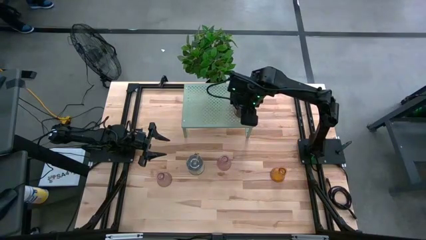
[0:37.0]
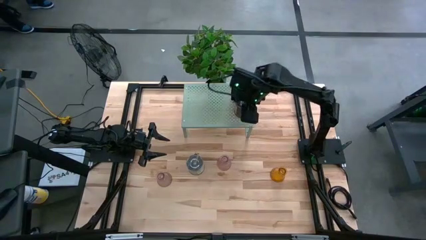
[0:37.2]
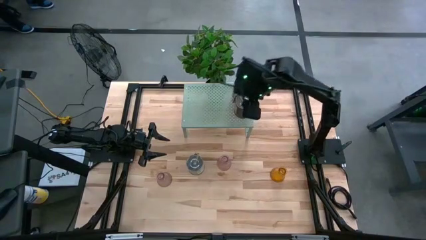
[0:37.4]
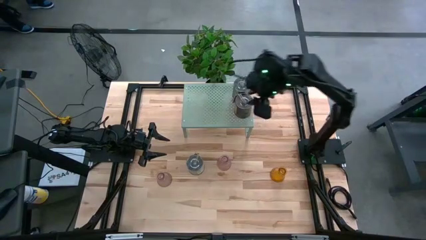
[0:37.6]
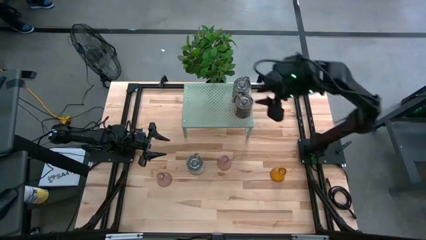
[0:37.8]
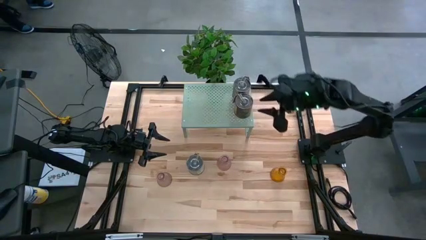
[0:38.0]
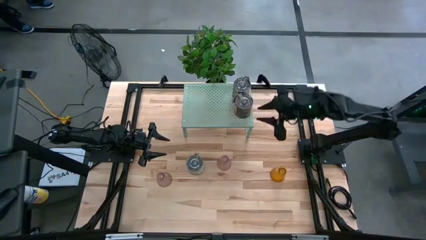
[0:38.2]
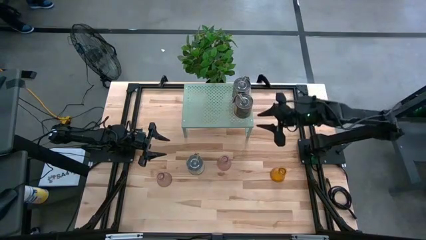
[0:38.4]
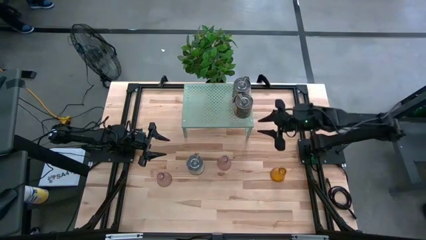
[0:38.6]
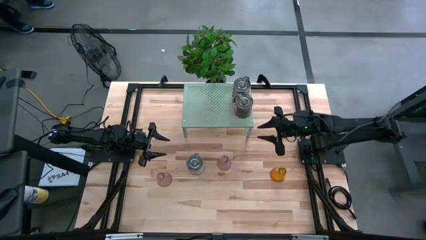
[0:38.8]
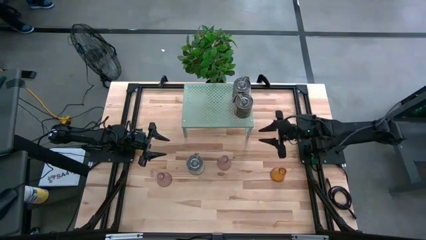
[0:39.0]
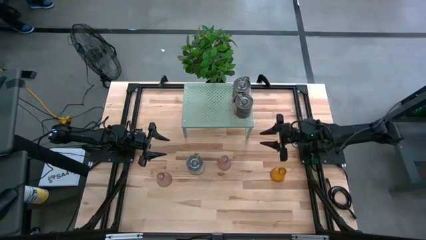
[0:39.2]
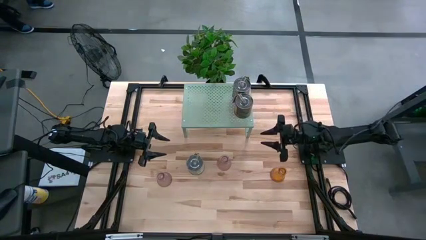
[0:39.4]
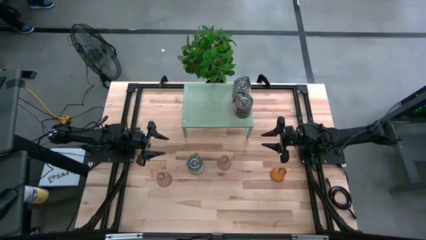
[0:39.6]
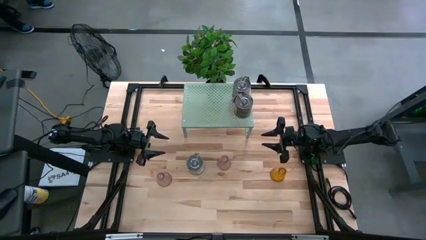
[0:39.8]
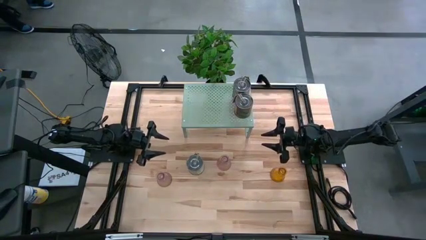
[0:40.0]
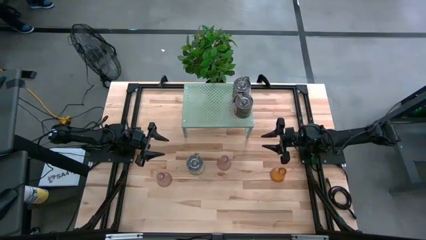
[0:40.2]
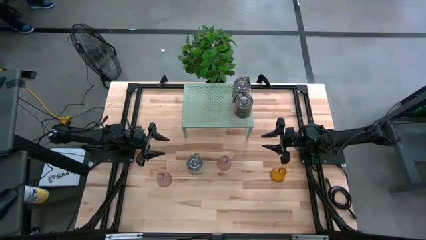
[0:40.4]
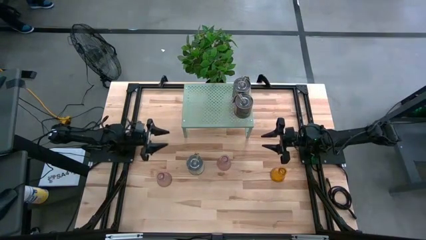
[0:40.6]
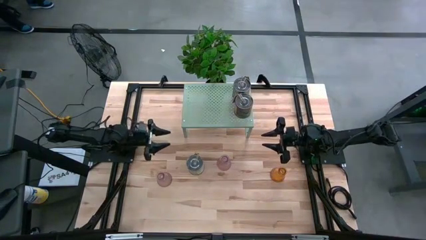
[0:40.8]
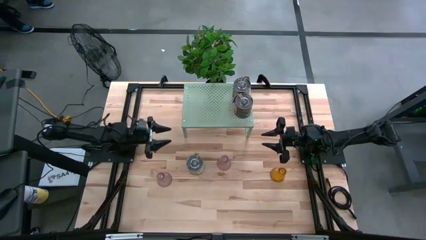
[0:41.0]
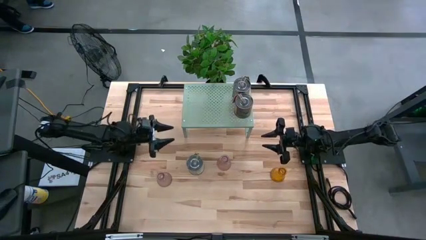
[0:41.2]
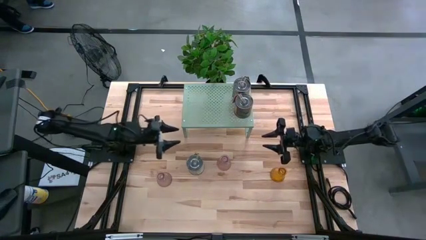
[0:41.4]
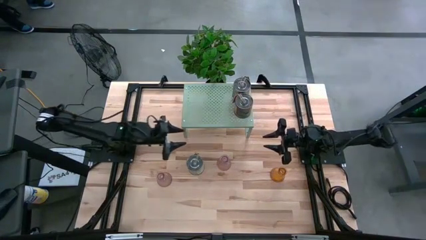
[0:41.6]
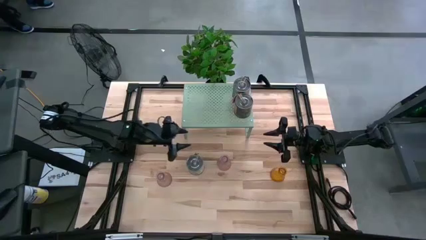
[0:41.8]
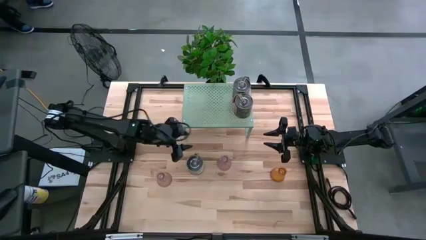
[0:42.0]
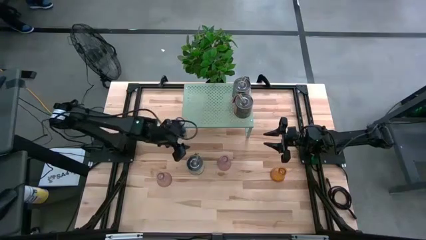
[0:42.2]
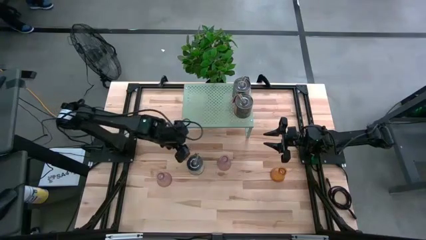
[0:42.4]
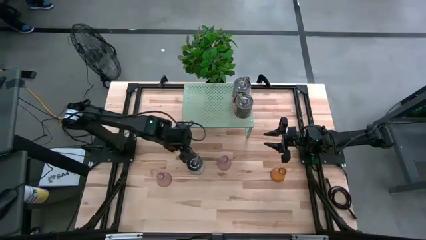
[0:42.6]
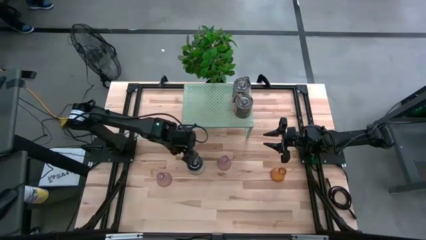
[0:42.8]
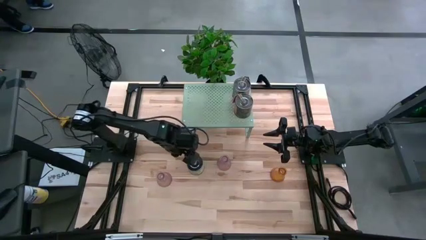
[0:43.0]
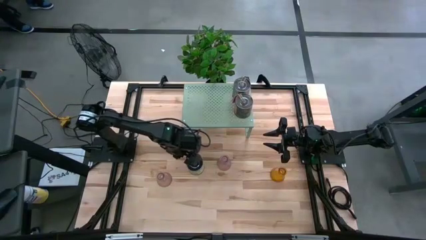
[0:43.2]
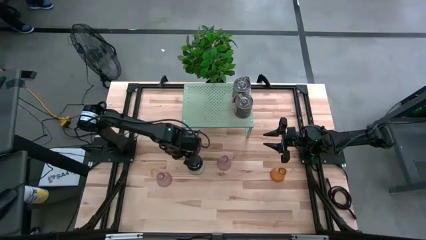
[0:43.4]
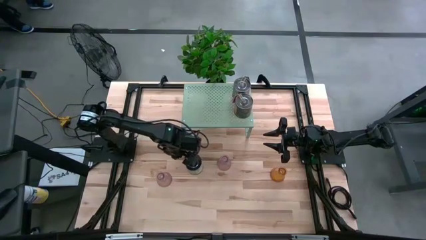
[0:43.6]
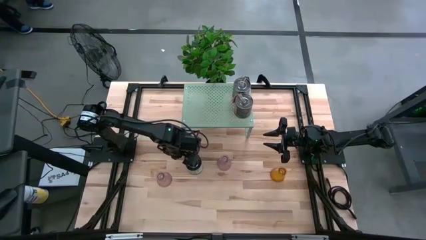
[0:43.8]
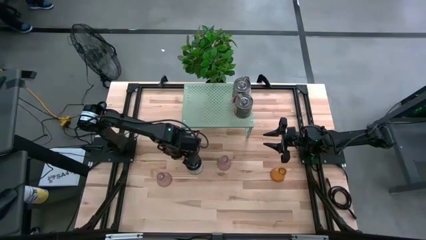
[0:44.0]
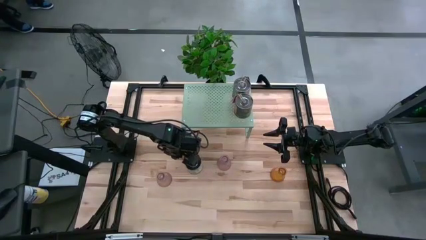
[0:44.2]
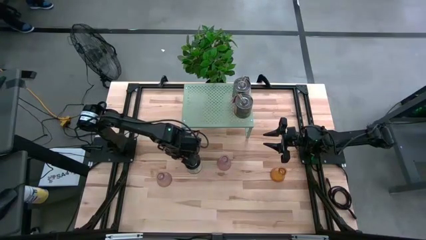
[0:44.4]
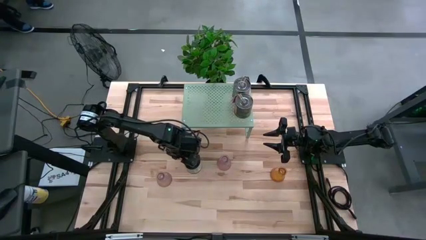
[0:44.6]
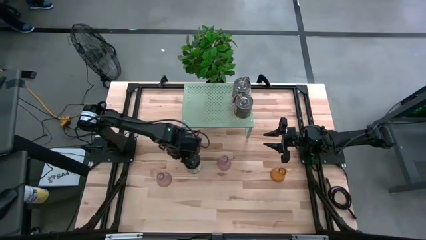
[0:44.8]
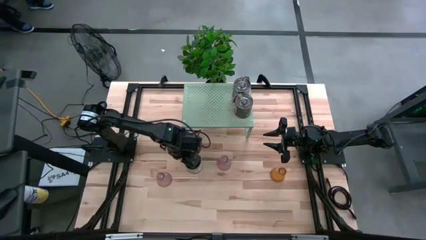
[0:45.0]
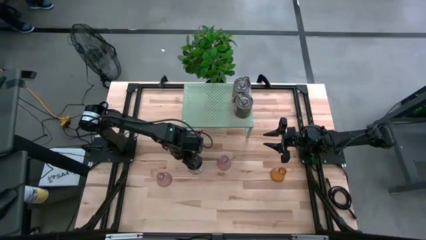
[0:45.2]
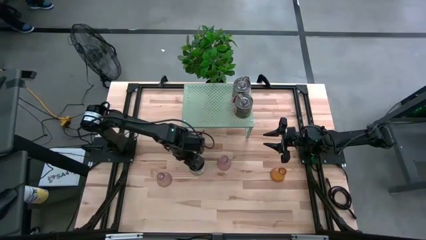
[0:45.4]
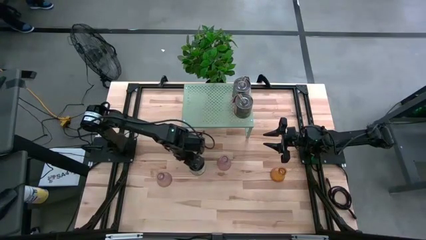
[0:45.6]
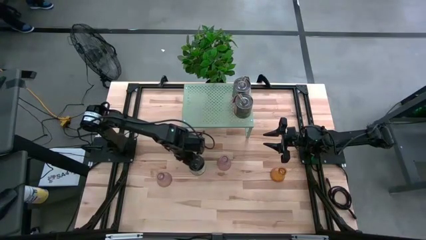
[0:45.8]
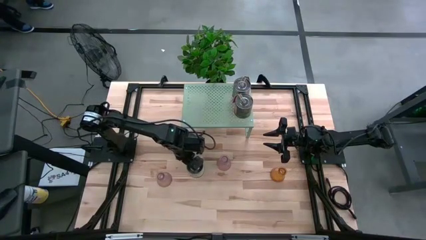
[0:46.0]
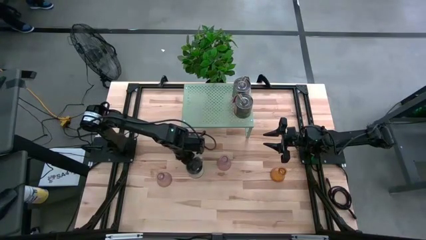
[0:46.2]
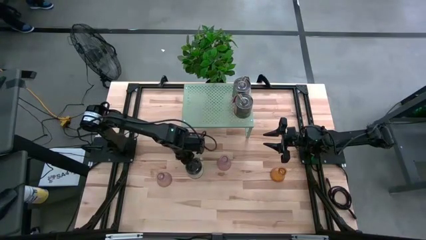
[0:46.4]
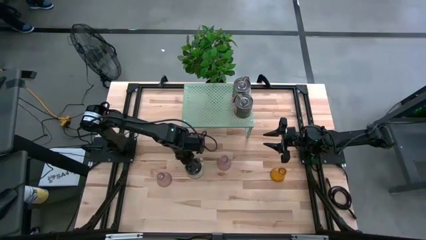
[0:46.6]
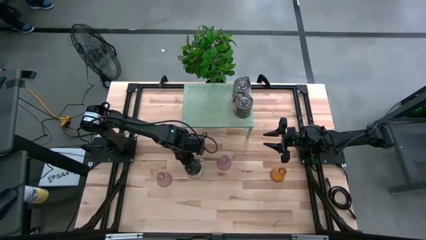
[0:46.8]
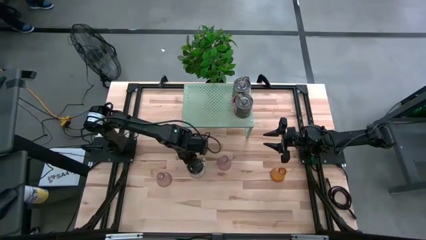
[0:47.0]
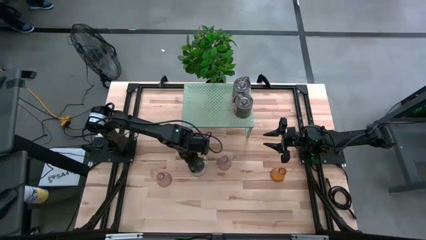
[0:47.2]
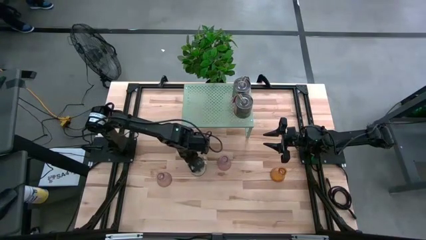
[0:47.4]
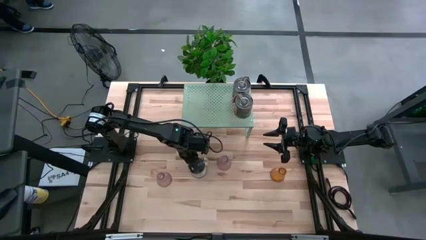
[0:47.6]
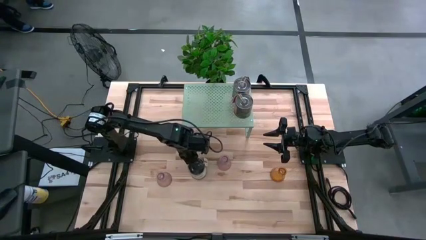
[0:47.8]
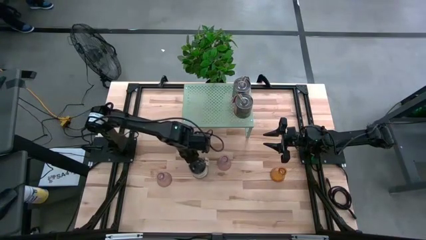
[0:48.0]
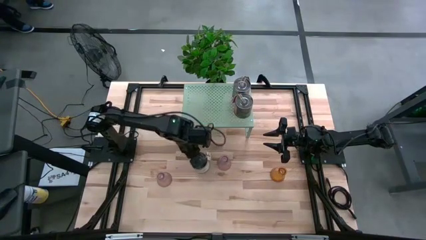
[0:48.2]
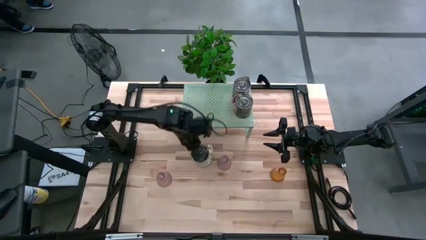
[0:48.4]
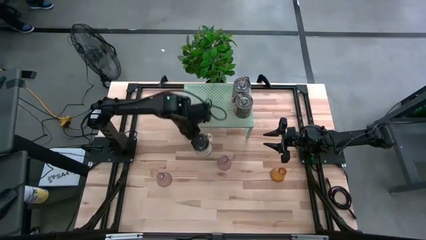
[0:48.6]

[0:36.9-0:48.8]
Task: Pick & Place candle stick holders
Put the scented candle on the shelf

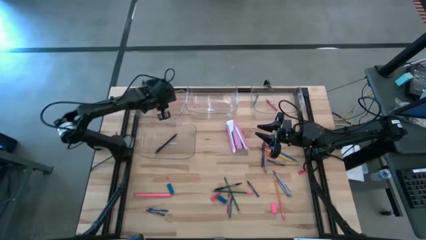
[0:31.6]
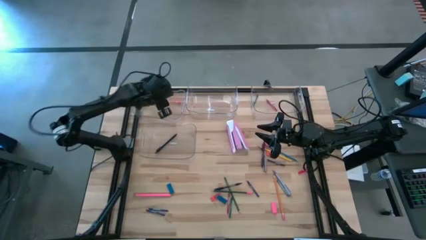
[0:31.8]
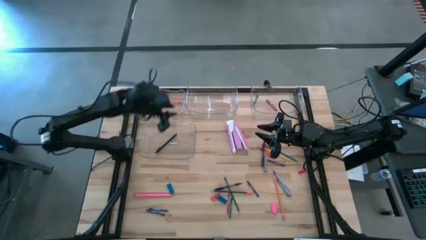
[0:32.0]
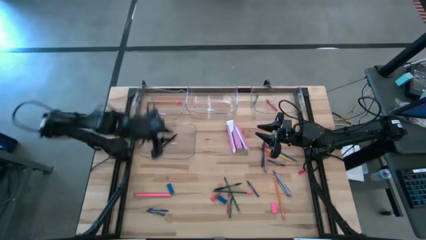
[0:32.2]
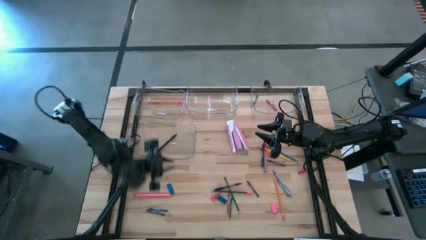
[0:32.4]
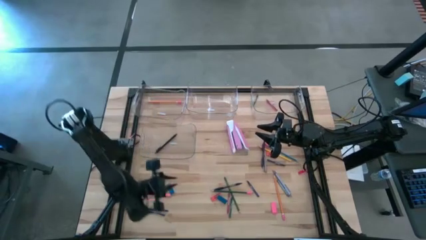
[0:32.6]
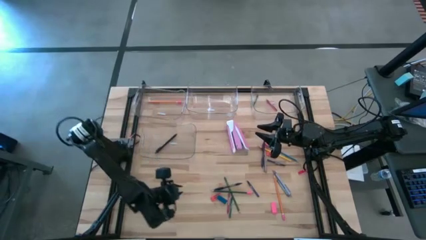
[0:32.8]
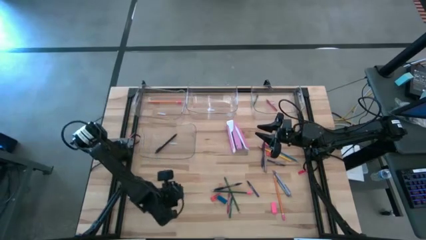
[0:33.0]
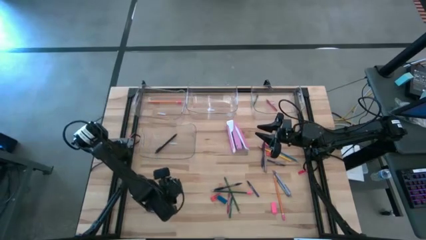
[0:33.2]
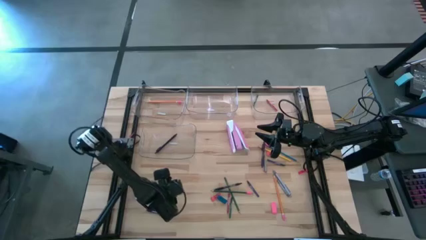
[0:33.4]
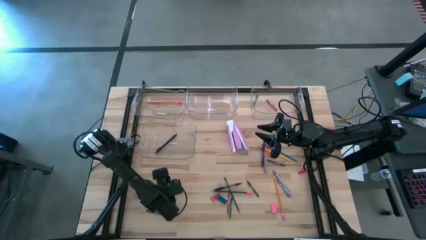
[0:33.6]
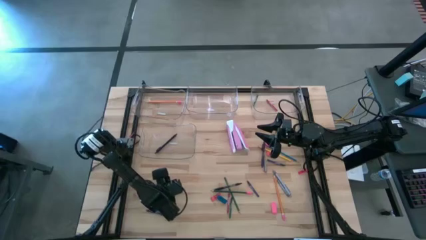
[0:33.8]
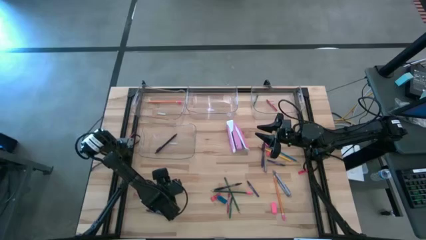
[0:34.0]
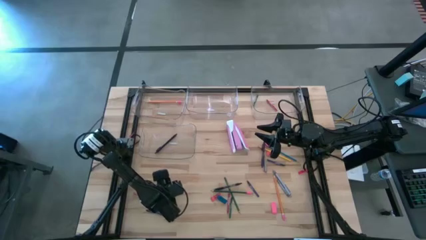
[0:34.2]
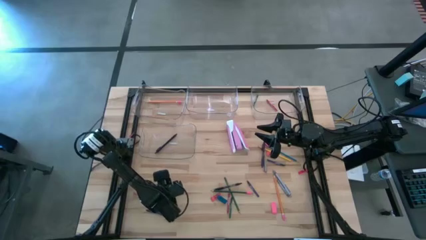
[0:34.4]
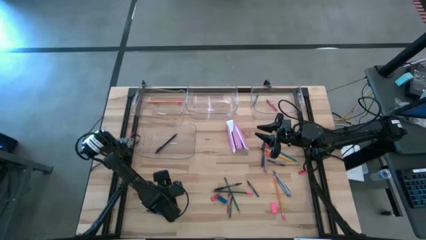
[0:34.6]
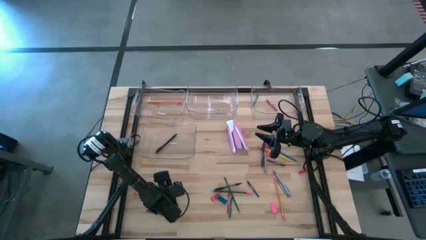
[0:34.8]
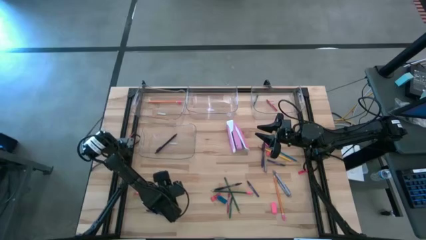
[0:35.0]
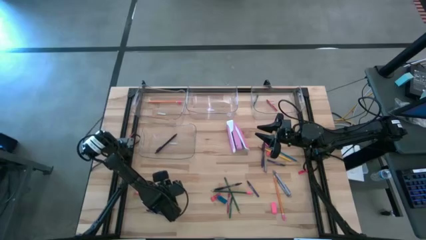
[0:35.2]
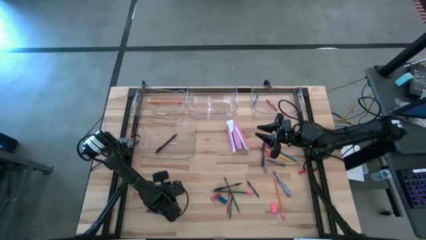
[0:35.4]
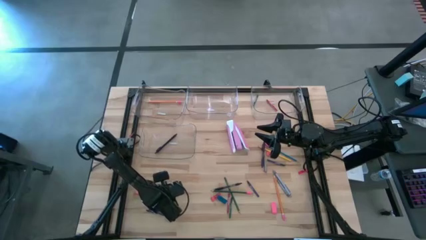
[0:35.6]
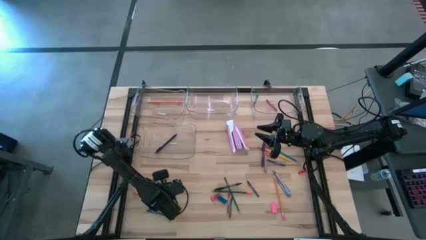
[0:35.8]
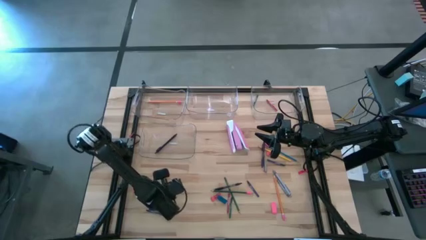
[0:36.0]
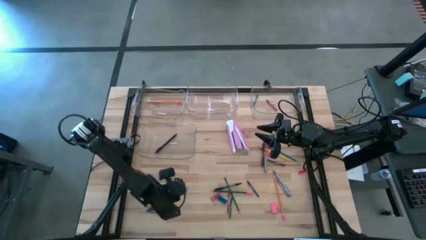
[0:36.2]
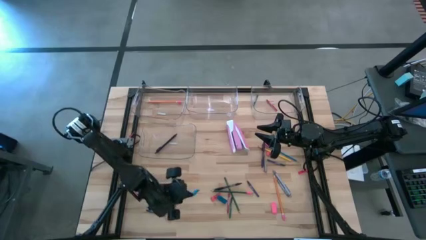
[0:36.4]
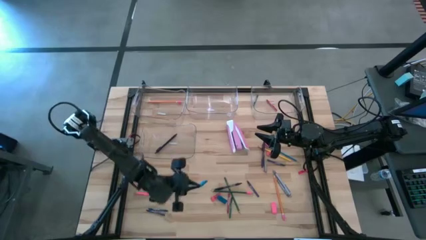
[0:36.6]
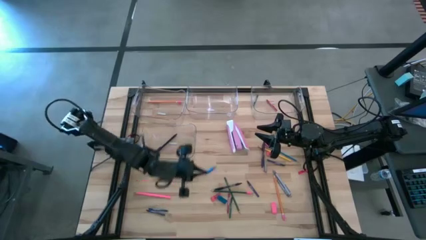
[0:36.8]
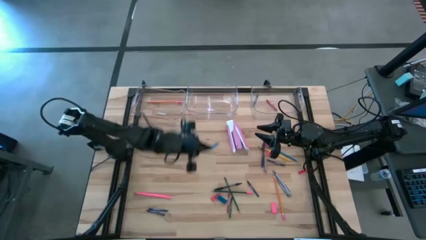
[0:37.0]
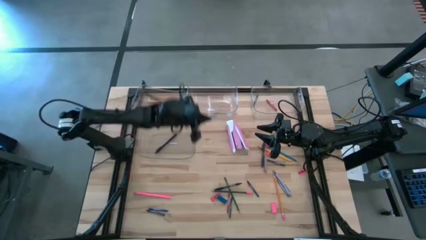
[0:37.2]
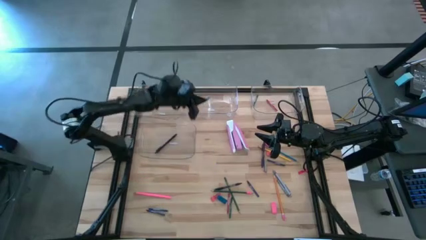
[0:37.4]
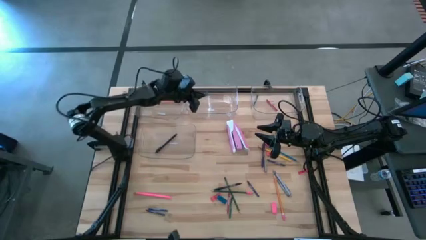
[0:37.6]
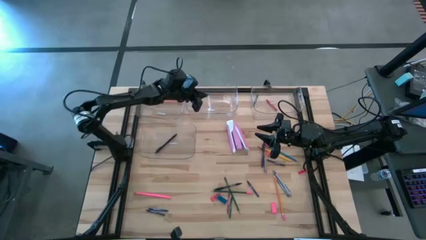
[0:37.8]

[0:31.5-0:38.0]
Task: Sort crayons/erasers/pens/pencils in bins
Put the blue eraser into the middle transparent bin
